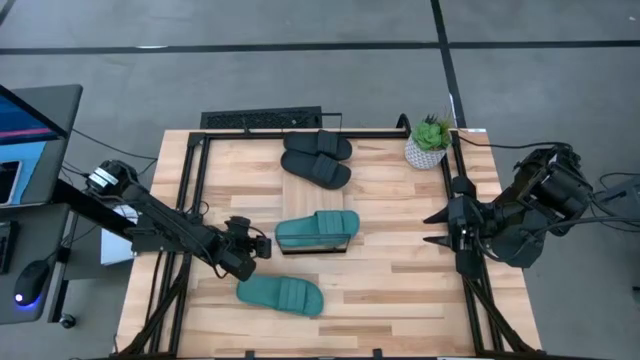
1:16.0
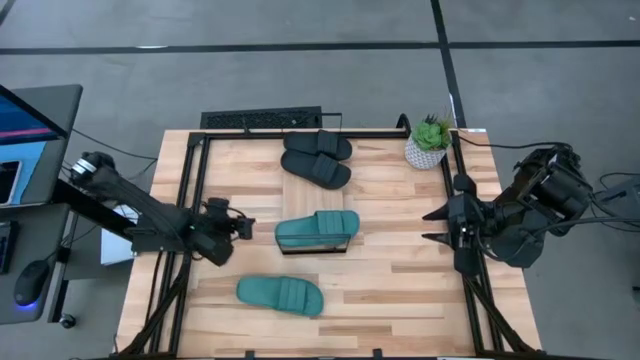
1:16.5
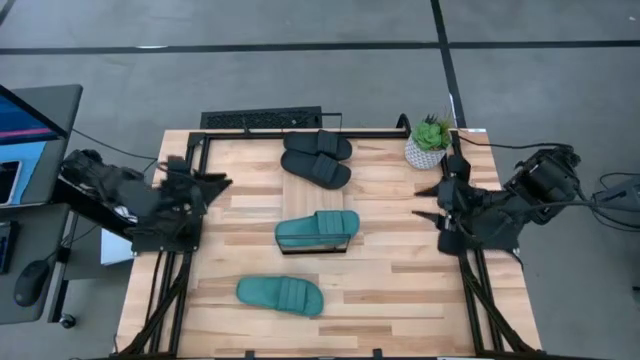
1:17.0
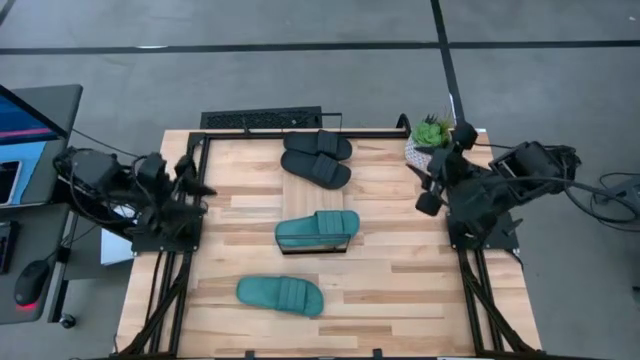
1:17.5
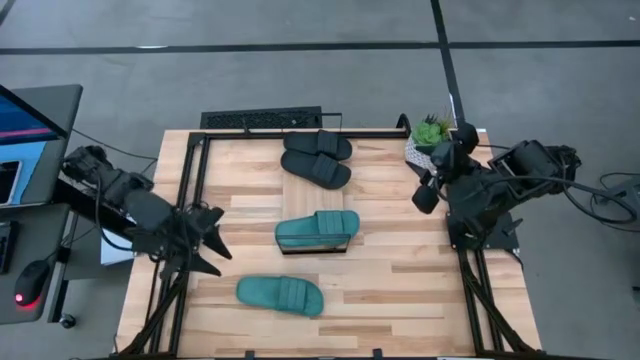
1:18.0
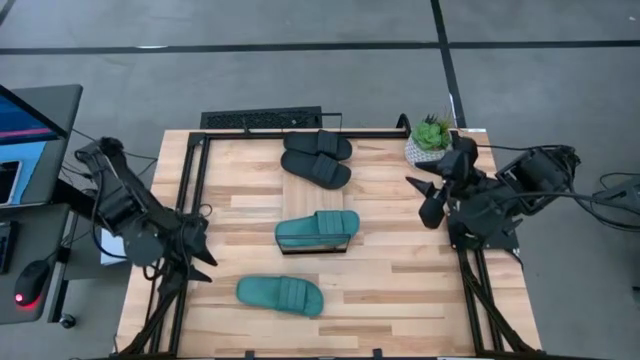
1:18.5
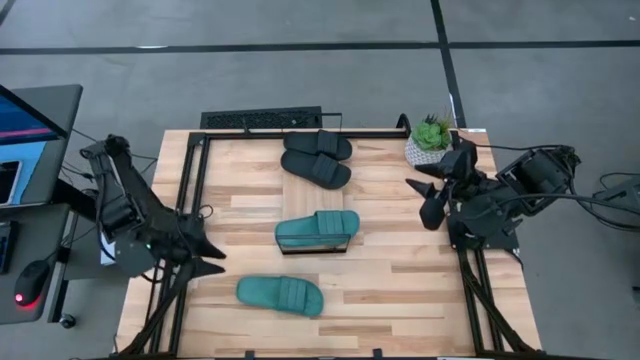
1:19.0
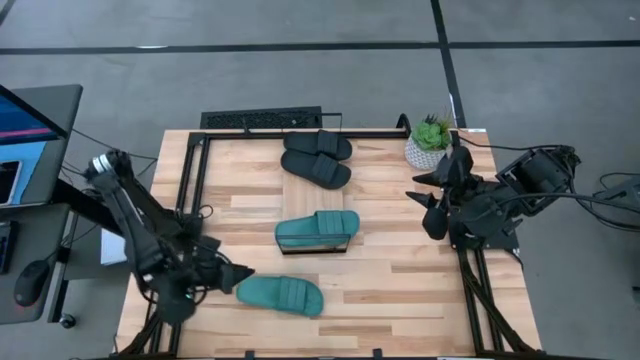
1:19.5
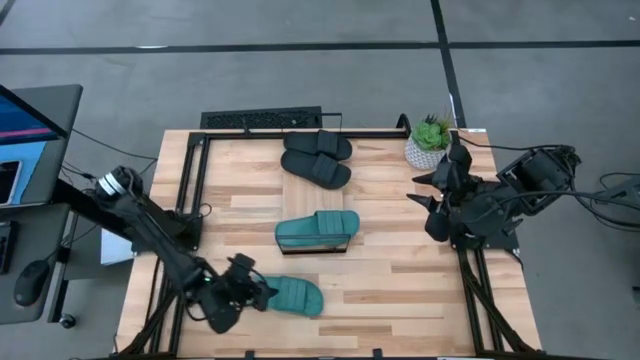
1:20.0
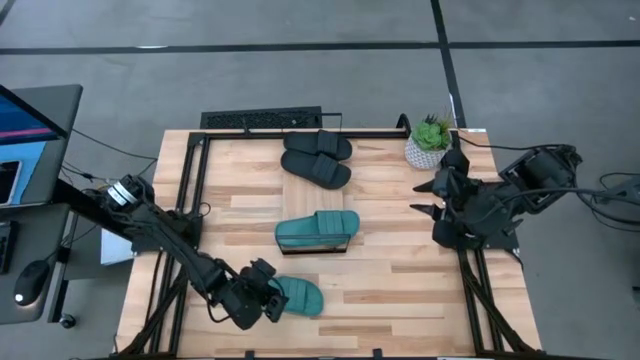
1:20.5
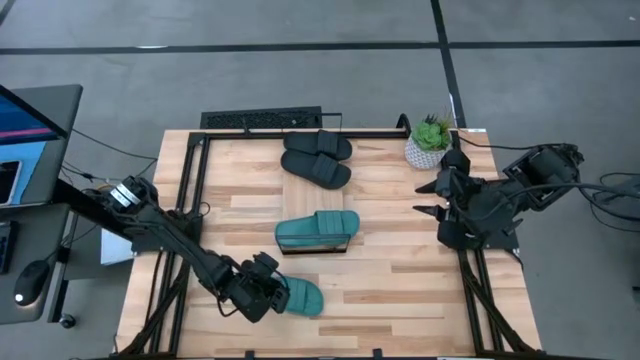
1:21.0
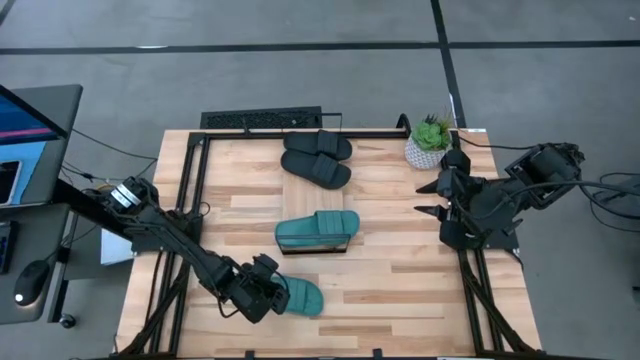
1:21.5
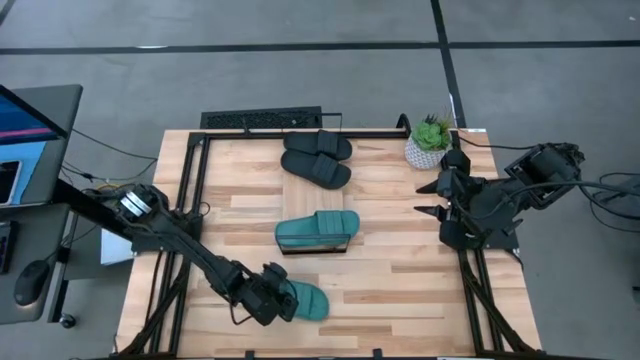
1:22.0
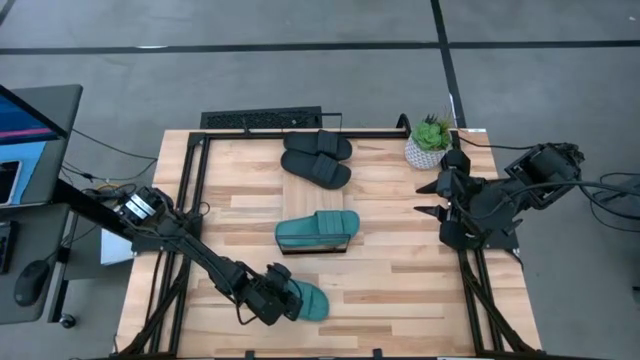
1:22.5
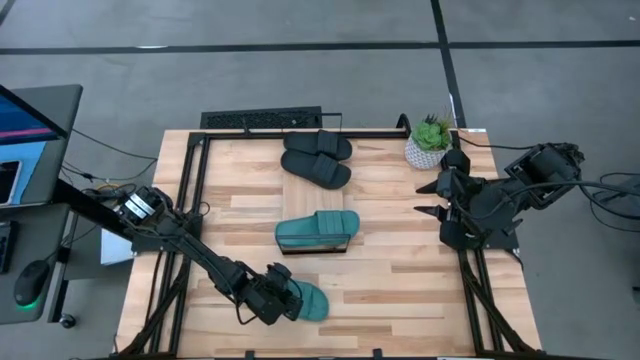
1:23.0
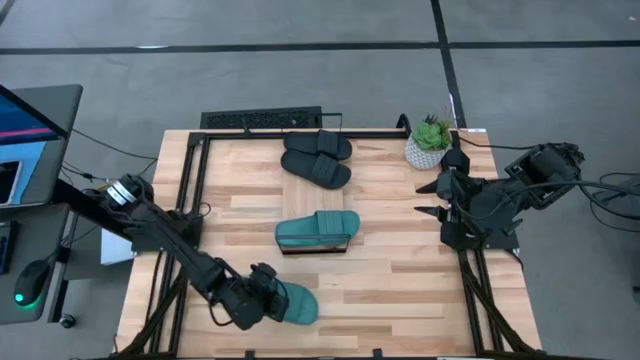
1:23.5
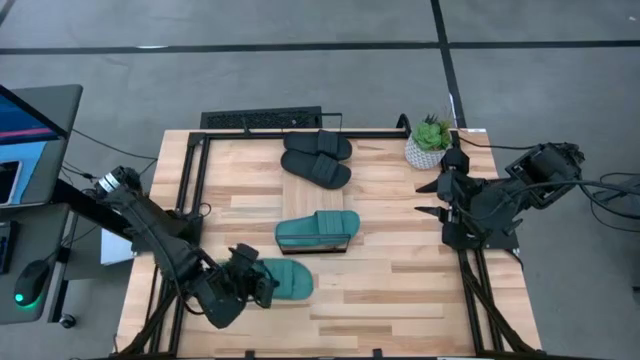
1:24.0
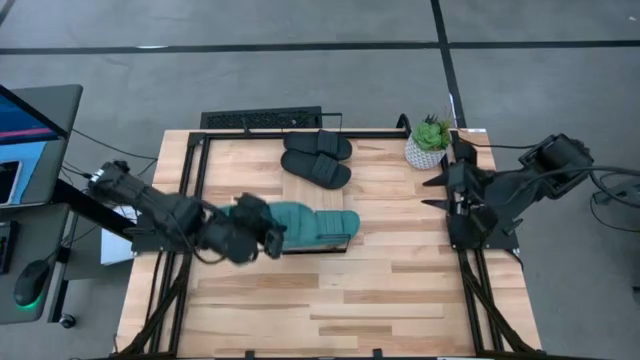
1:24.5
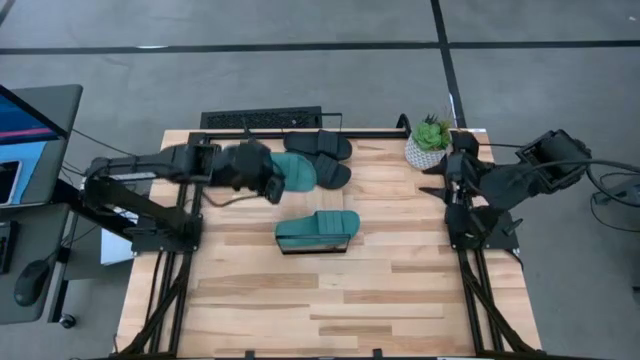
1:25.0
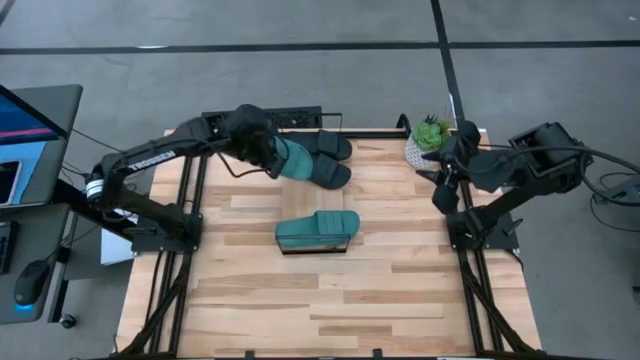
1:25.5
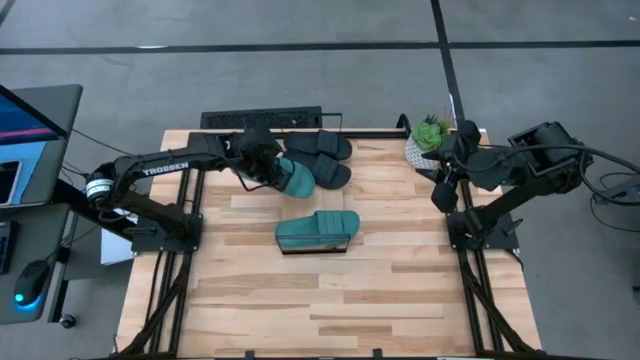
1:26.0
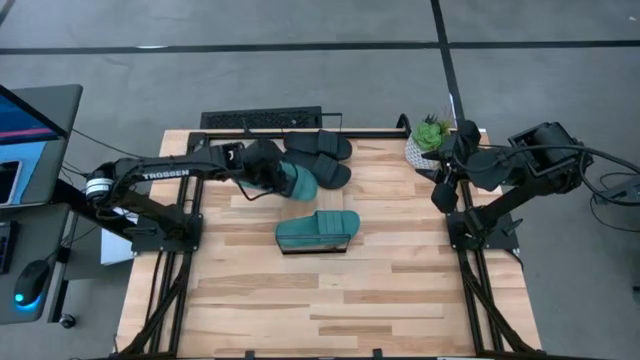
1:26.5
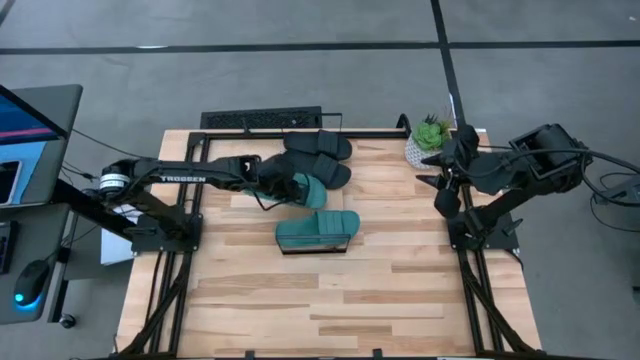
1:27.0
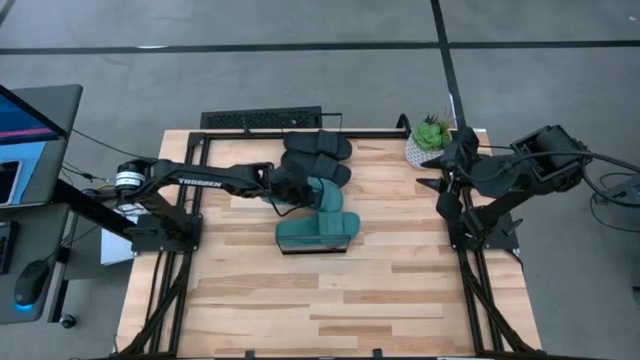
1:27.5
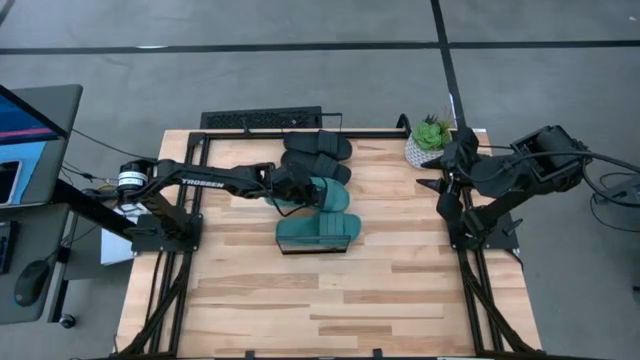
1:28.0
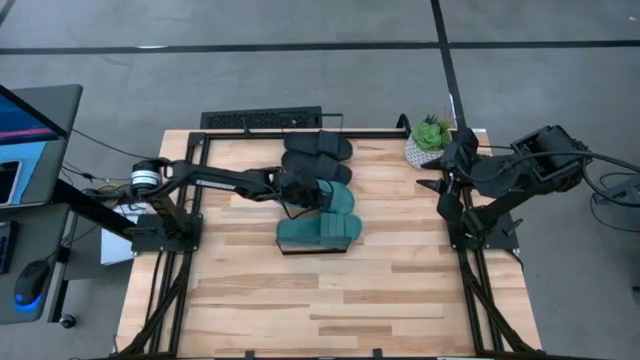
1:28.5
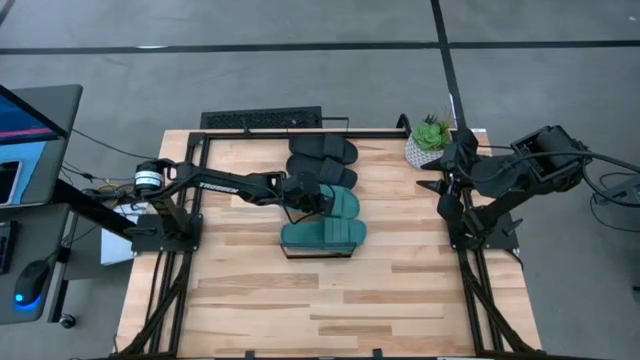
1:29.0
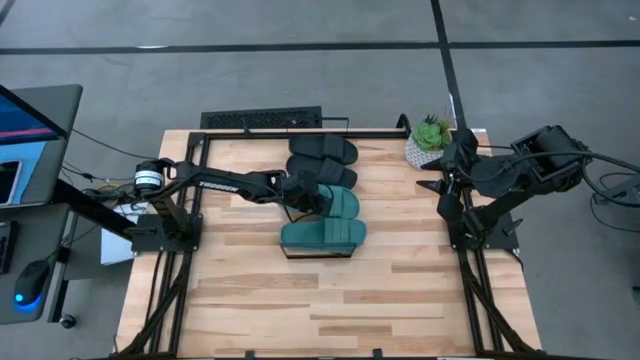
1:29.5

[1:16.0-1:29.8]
Task: Pick and place slides into the shelf
Put the green slides on the shelf

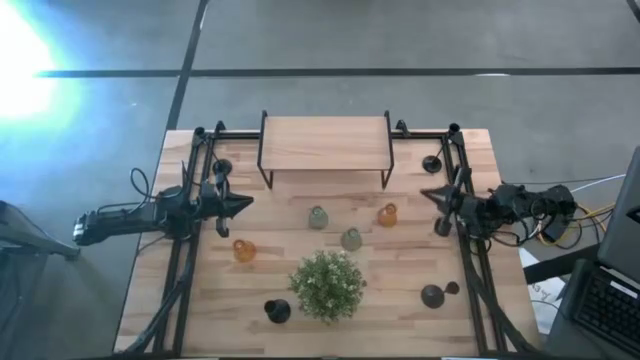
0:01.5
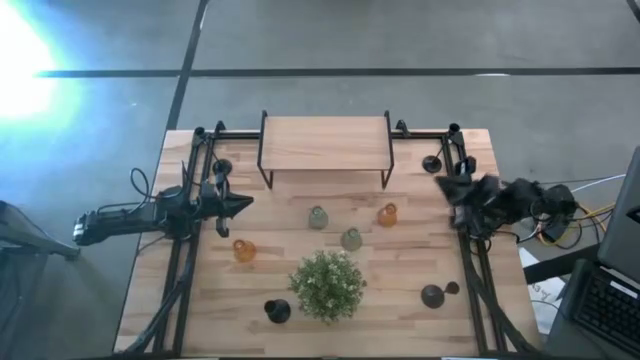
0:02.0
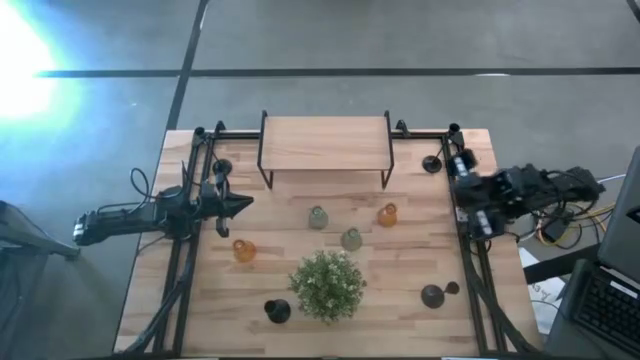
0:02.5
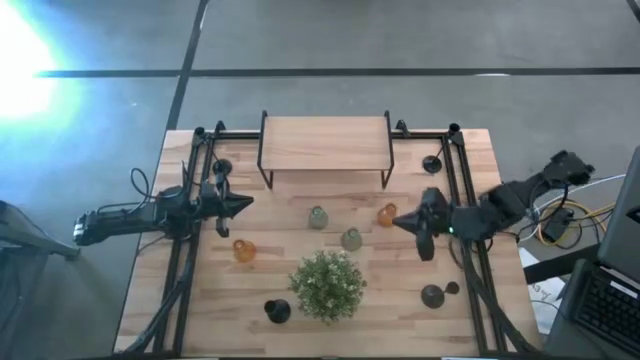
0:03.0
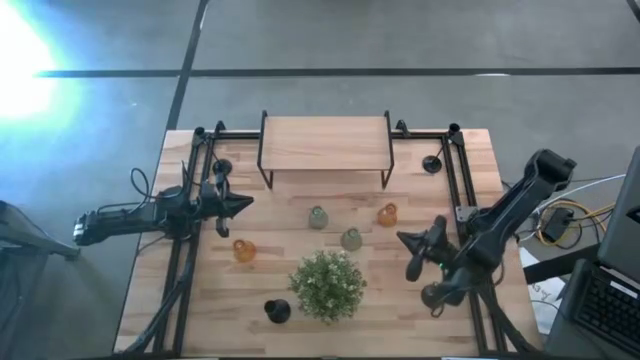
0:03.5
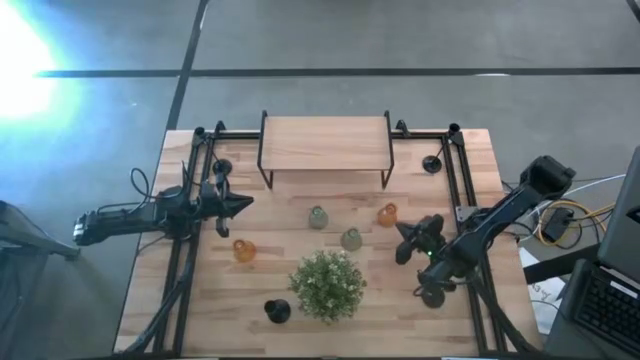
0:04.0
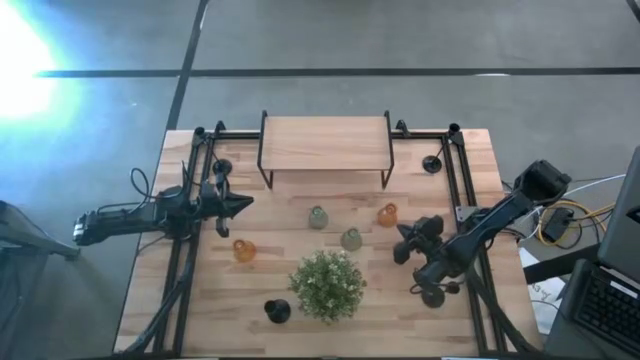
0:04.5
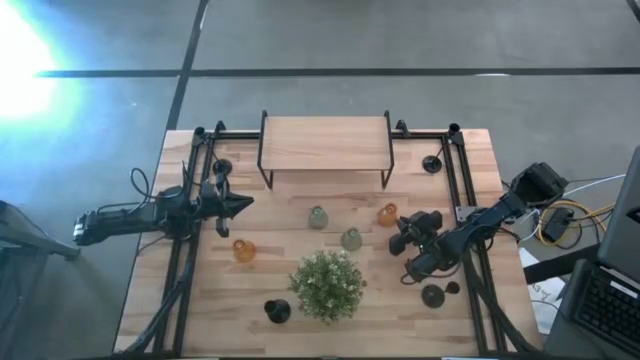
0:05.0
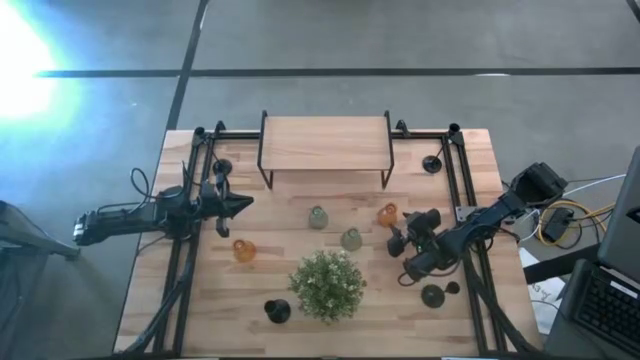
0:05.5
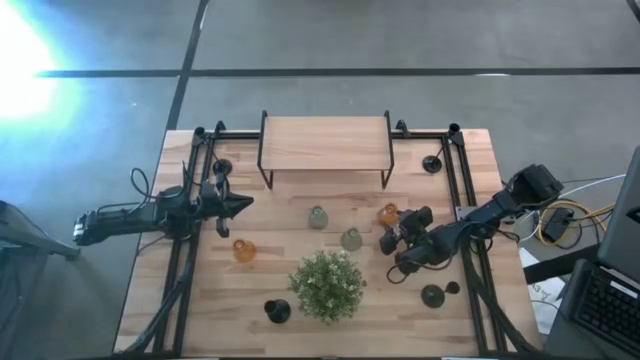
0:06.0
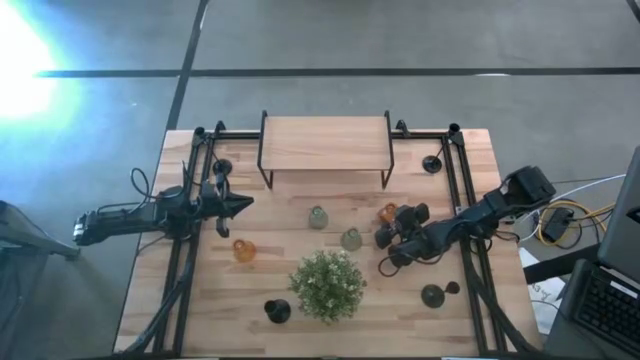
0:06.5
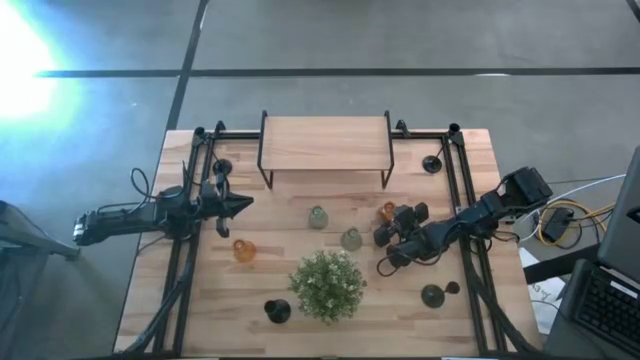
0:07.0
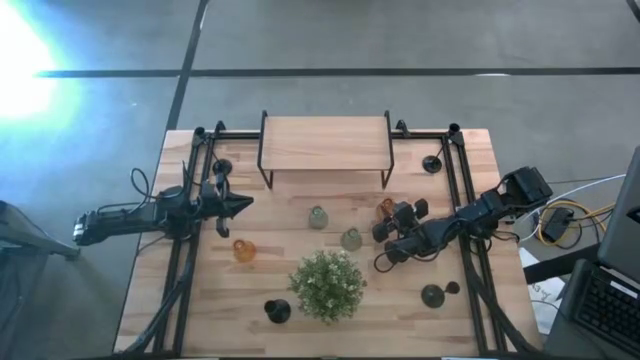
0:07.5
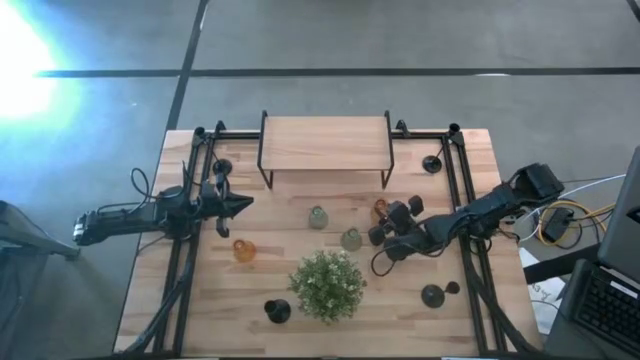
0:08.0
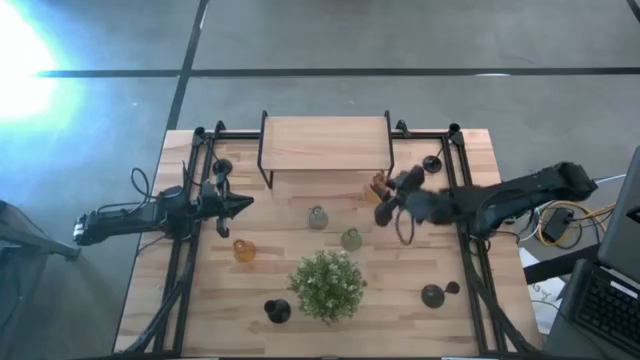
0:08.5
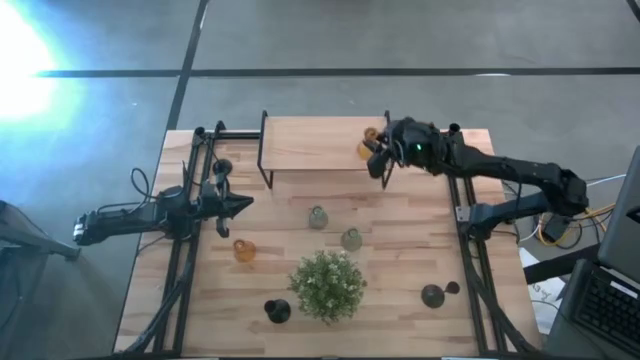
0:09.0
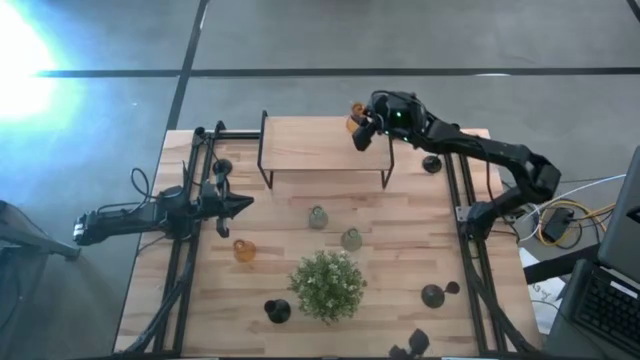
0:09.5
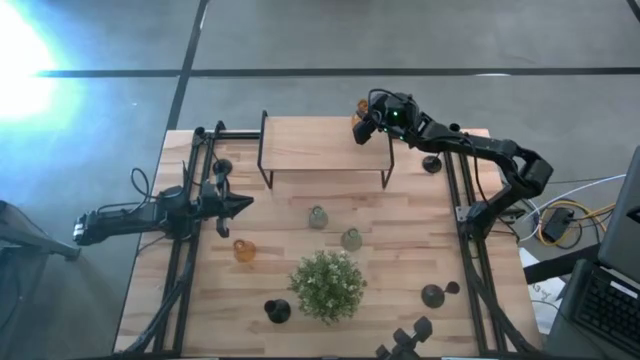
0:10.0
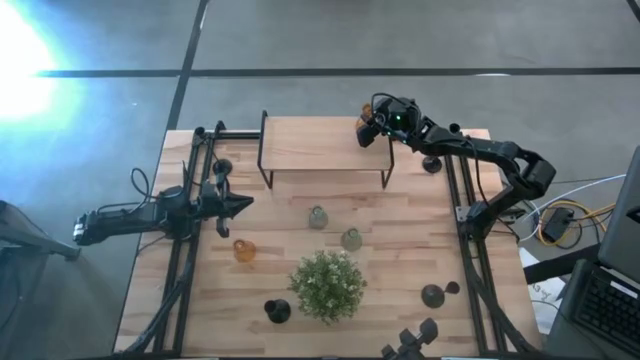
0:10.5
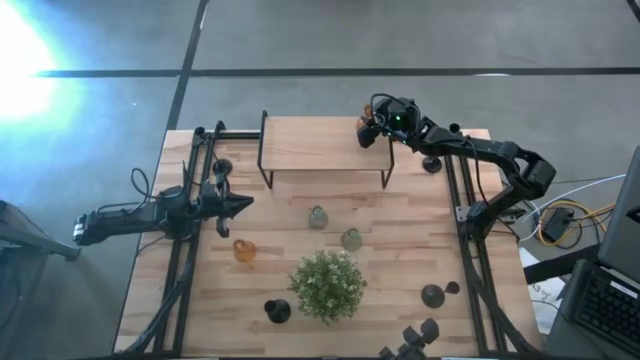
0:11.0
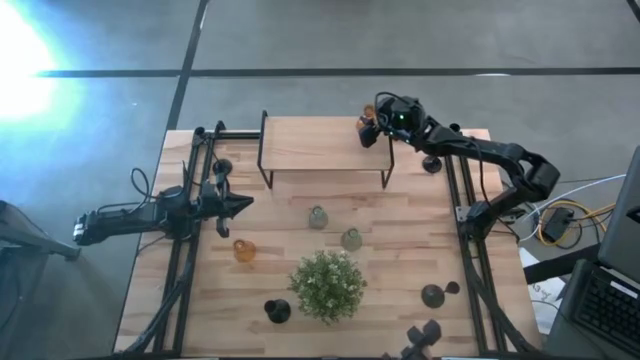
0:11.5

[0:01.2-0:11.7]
Task: Pick & Place candle stick holders
Put the orange glass candle holder on the shelf
